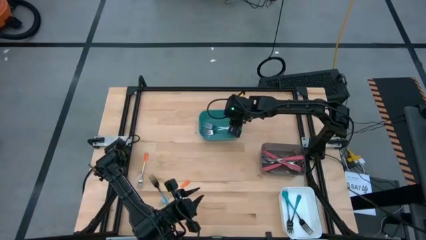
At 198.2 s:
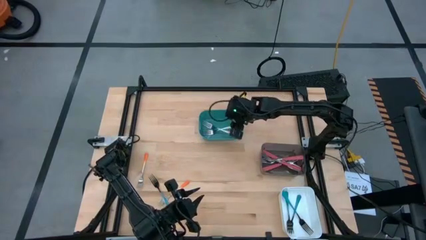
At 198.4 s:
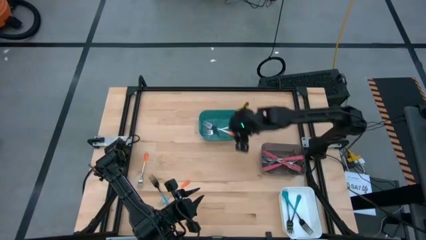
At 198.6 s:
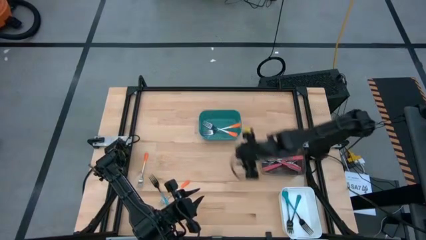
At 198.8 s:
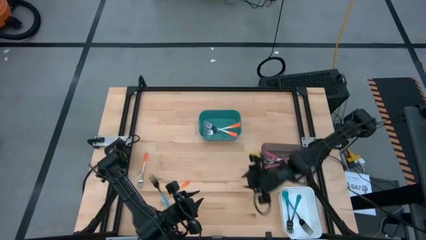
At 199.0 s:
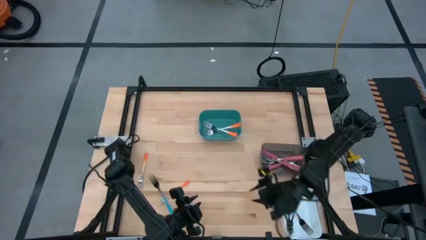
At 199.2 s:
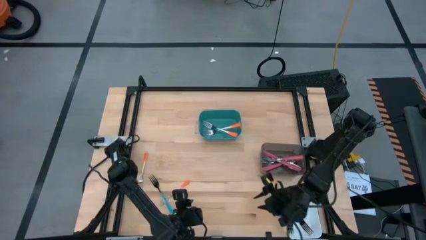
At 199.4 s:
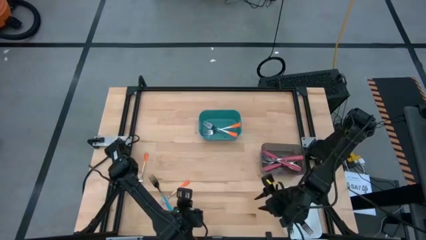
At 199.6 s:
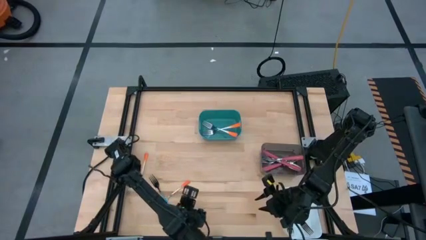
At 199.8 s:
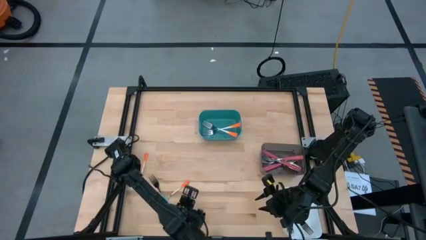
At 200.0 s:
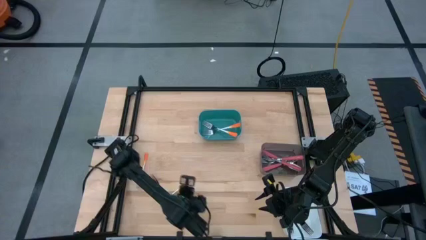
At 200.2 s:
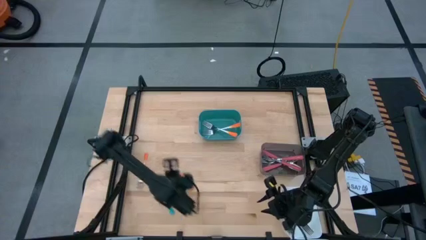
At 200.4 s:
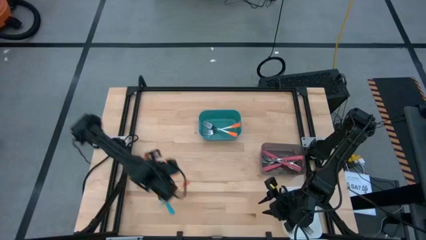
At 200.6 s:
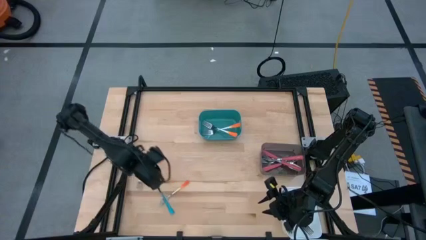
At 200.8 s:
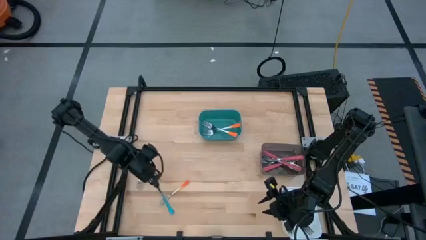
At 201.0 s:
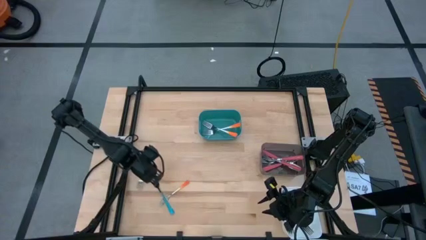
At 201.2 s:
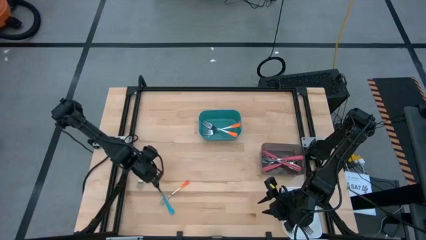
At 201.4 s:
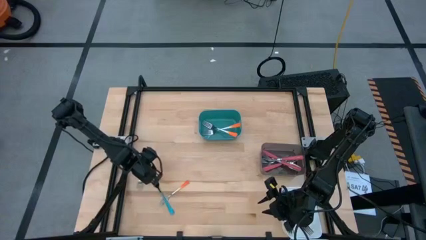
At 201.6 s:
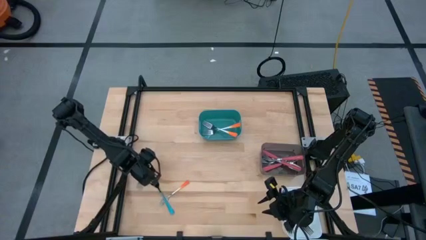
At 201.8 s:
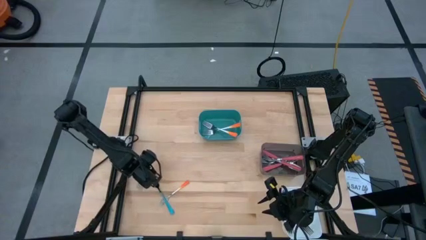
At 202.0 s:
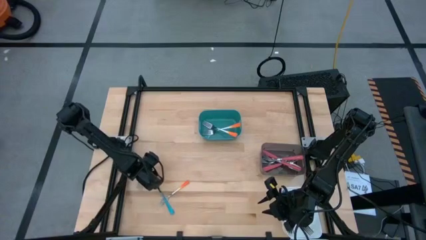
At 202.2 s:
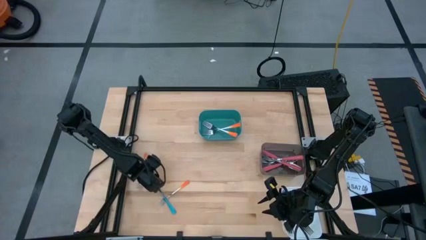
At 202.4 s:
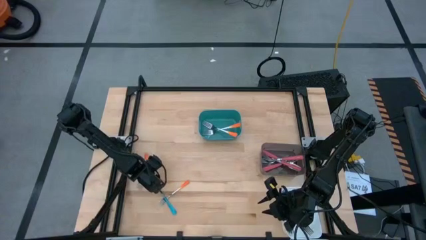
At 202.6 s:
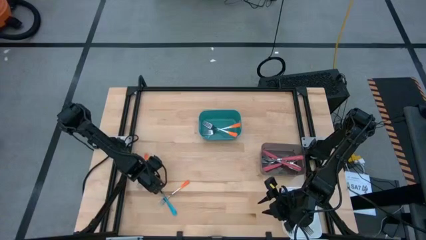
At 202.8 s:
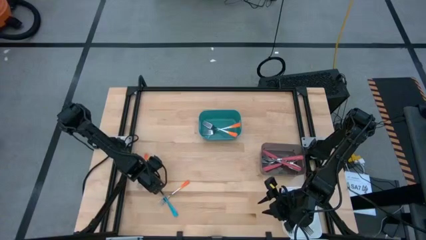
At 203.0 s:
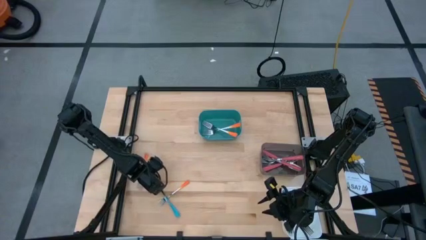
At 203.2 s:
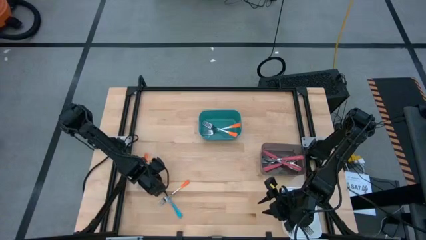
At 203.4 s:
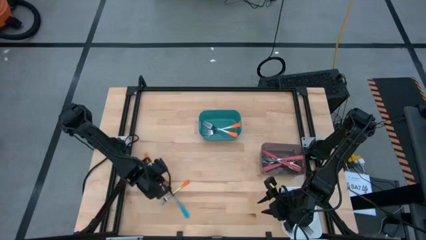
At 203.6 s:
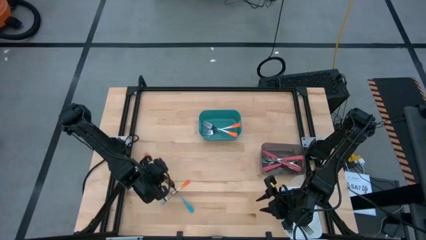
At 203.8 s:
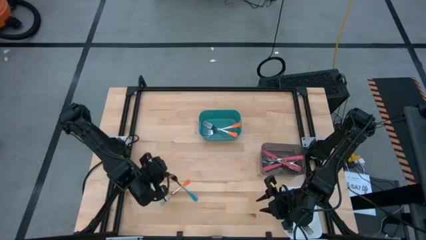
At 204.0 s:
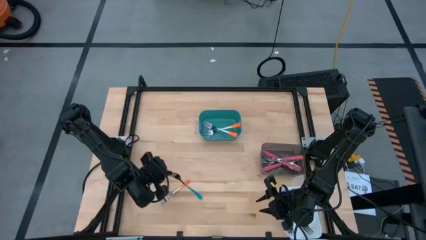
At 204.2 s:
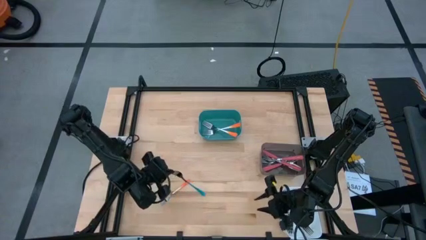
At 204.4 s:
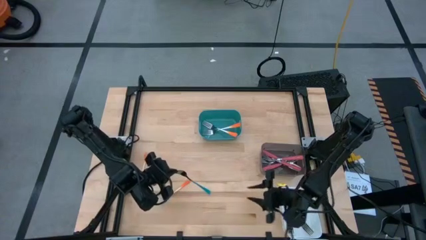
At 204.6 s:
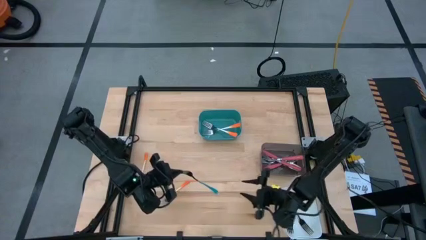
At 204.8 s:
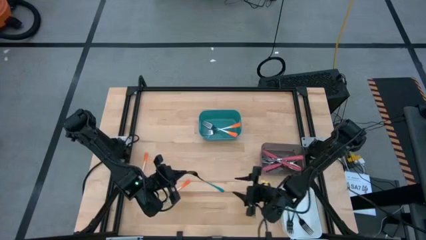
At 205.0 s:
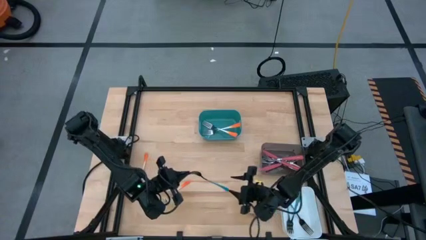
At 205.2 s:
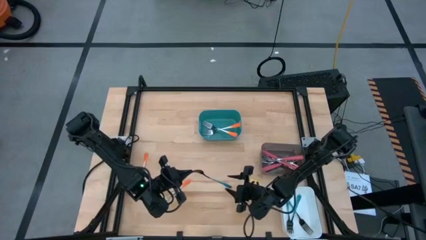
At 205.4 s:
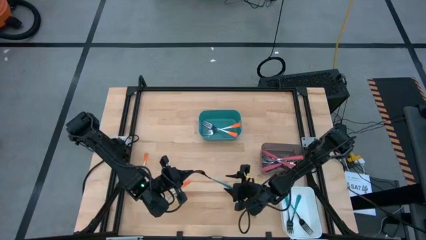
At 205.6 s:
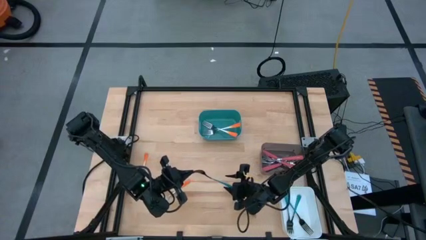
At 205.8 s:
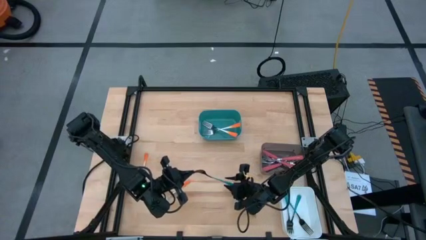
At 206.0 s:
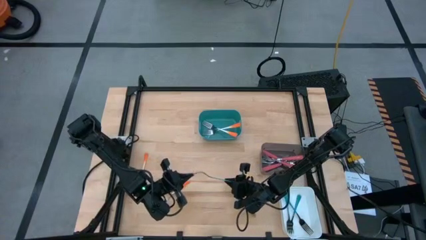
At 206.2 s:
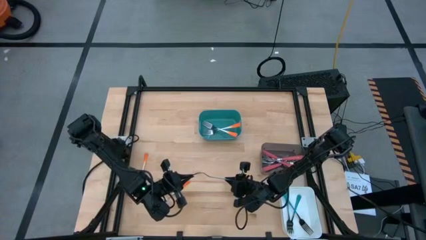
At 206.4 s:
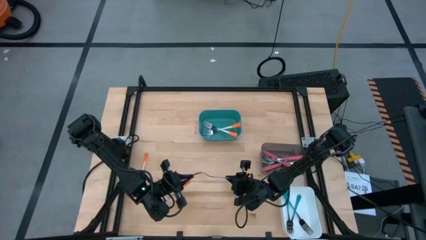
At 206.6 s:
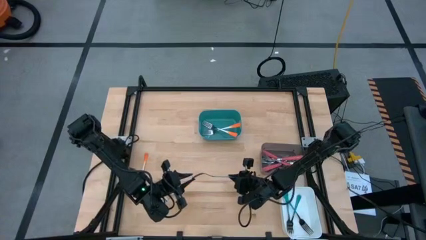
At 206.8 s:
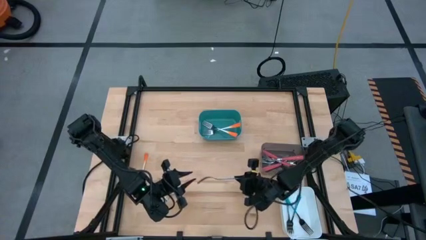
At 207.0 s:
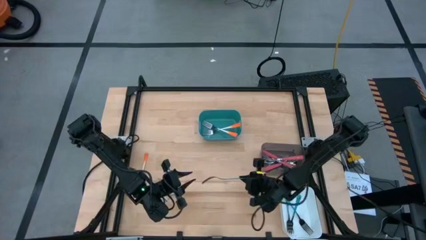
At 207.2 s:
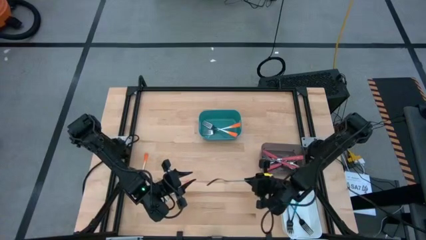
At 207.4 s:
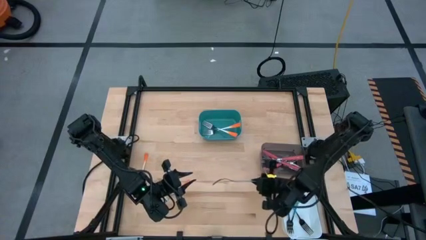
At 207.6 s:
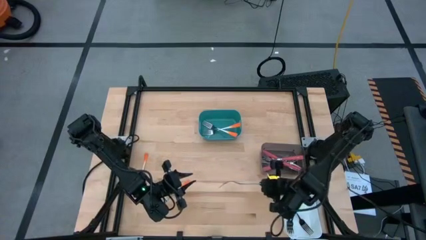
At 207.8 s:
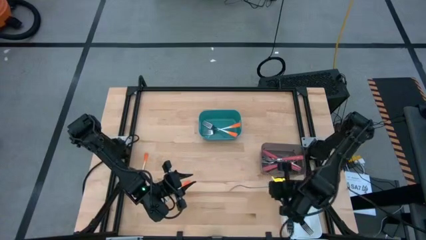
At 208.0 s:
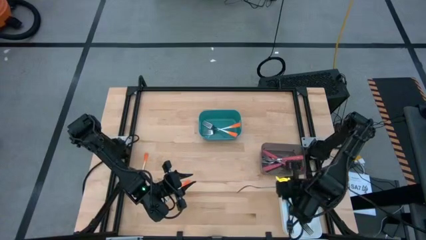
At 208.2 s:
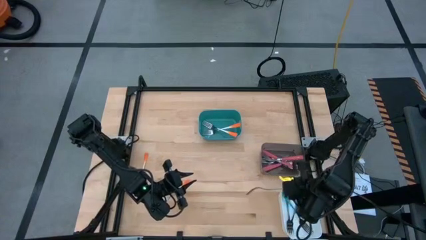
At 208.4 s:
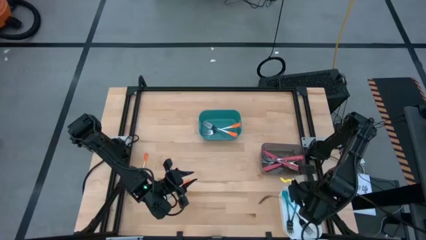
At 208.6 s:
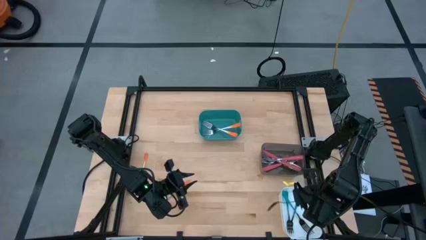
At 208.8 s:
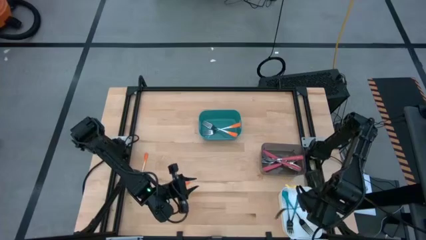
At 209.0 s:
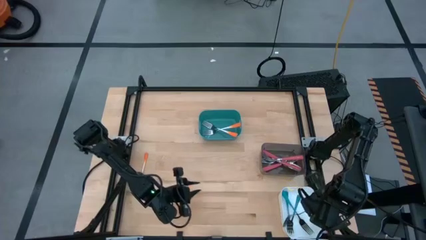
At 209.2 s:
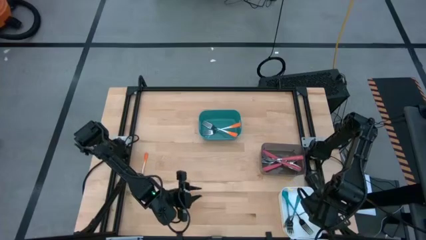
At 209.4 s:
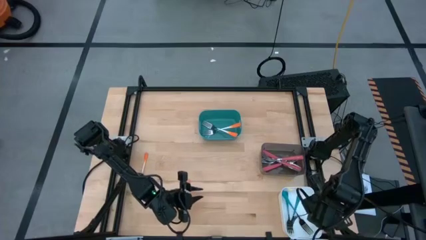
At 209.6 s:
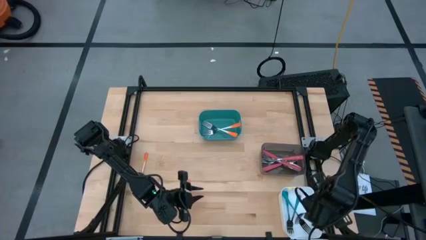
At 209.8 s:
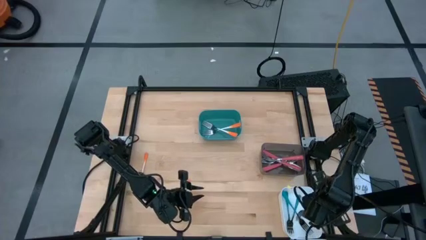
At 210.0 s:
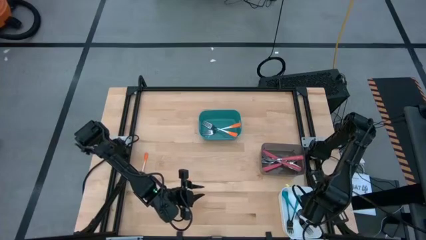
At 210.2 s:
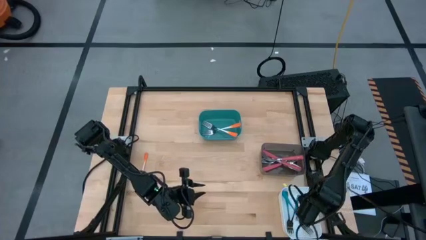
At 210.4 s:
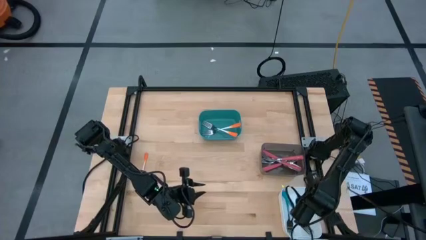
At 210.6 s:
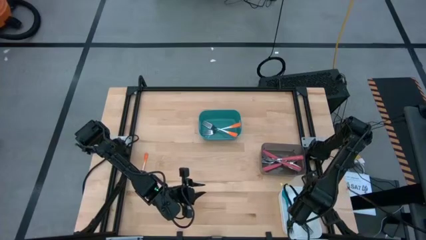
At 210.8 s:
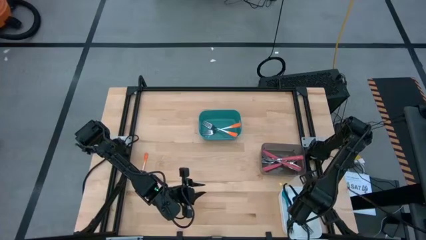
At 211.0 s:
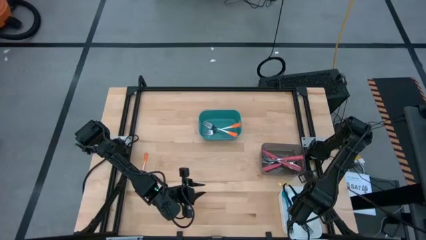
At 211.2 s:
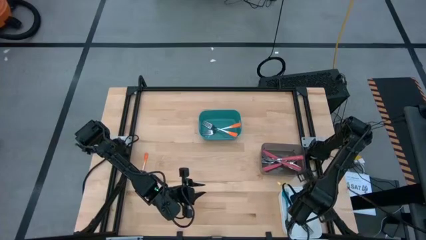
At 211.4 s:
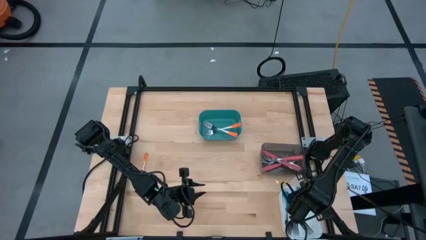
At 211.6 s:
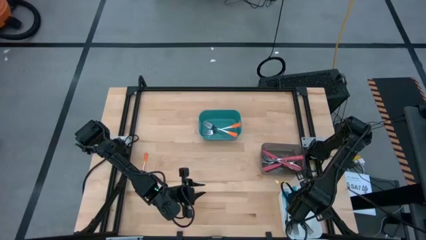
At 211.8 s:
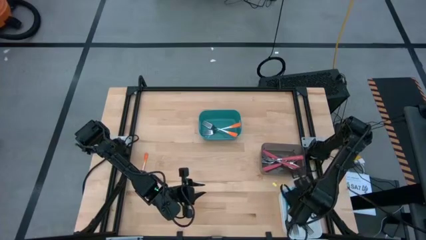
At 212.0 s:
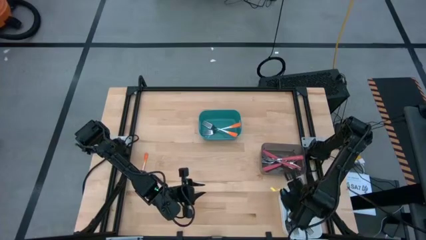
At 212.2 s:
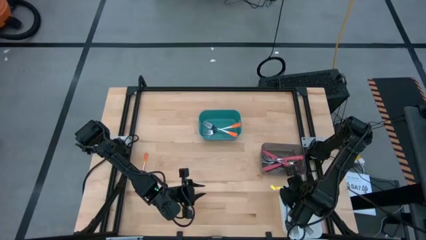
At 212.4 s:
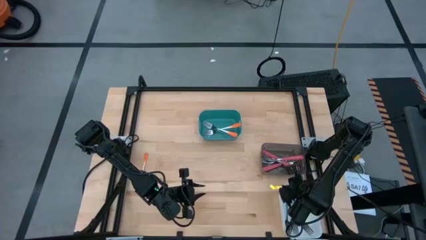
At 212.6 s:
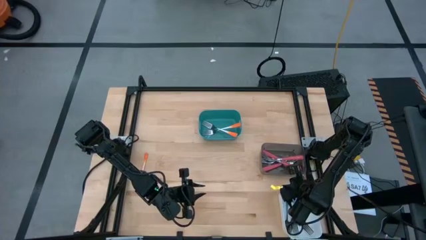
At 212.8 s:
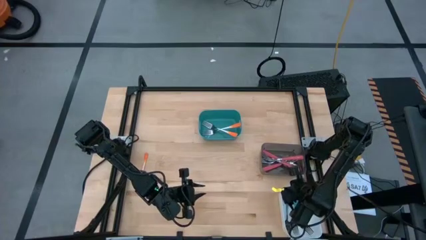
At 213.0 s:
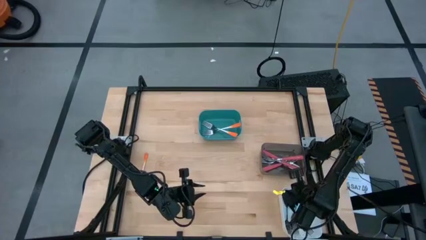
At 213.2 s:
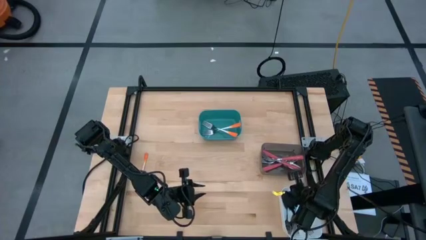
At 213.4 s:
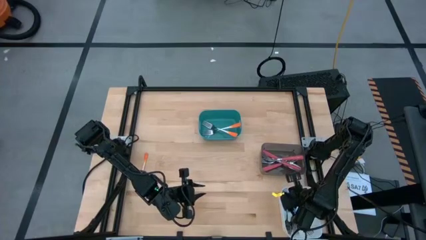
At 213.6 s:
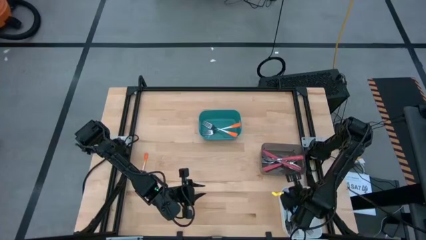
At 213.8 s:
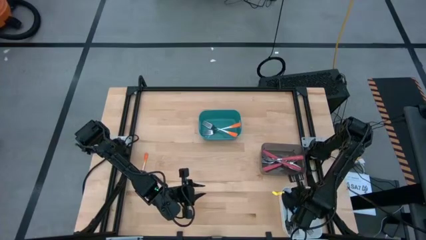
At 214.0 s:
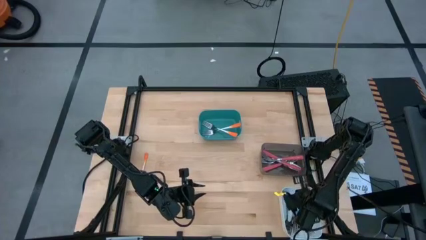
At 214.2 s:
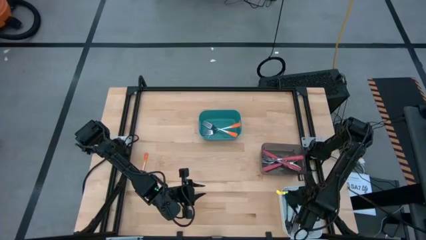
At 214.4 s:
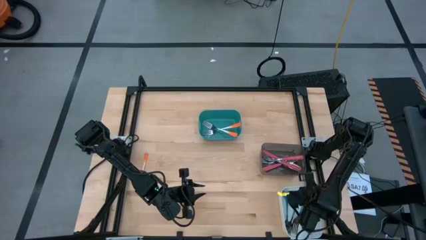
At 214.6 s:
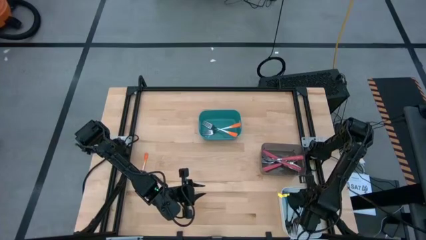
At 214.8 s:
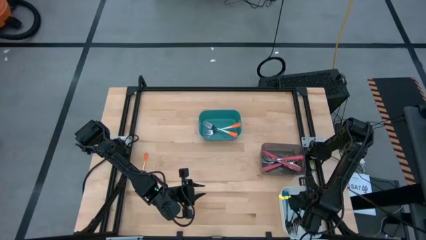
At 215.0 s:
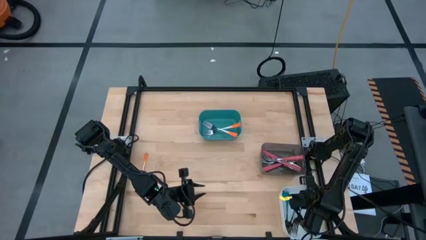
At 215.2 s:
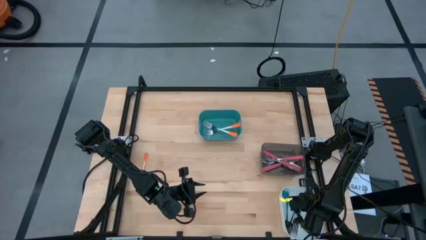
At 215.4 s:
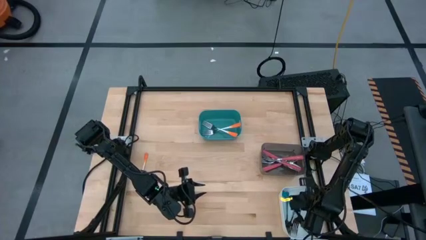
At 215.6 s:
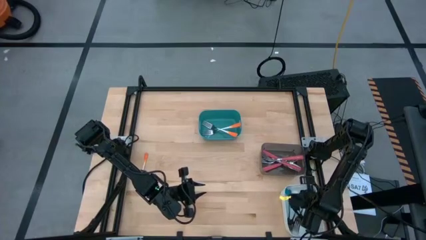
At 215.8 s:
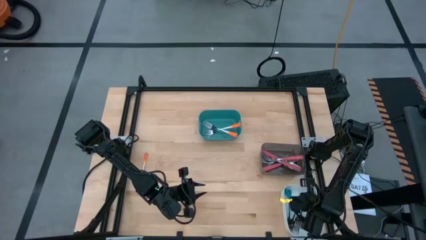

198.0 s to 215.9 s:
Task: Sort silverware by color (type)
Put the blue fork into the white bin
